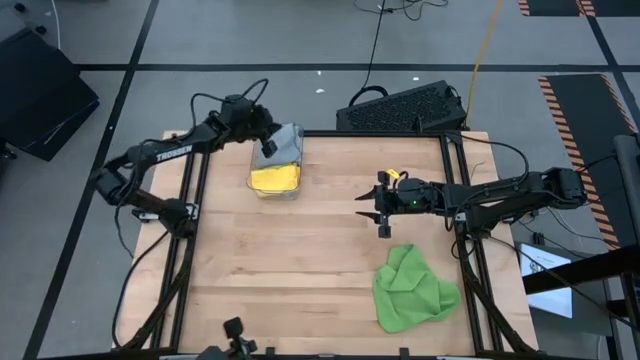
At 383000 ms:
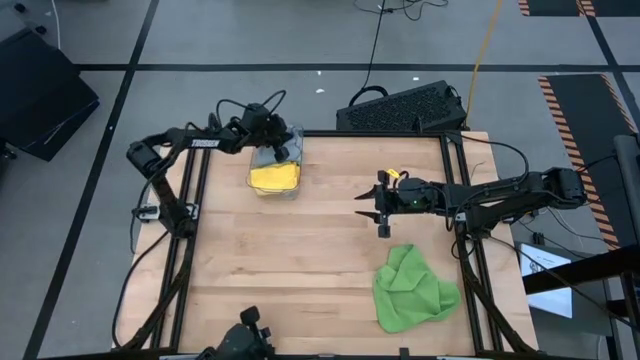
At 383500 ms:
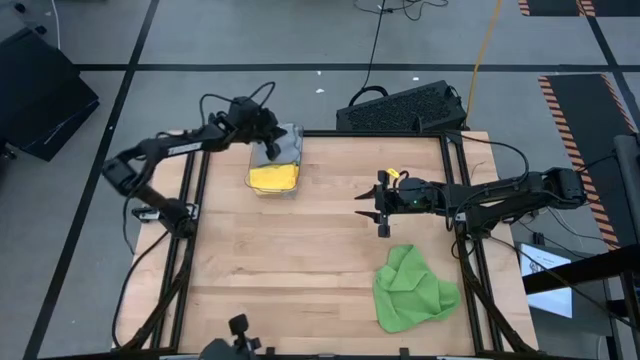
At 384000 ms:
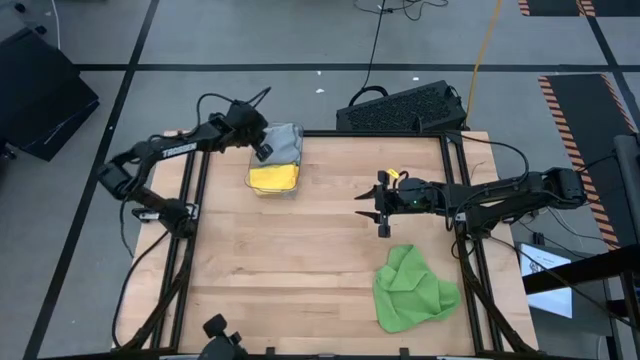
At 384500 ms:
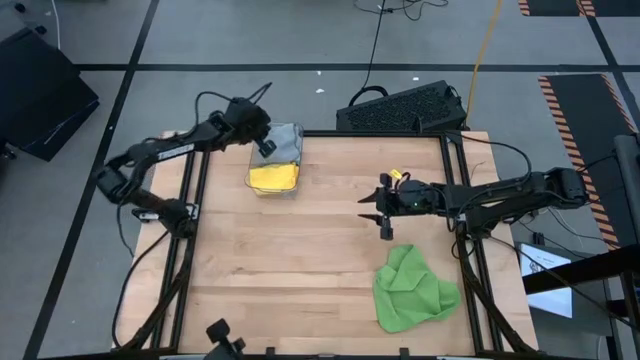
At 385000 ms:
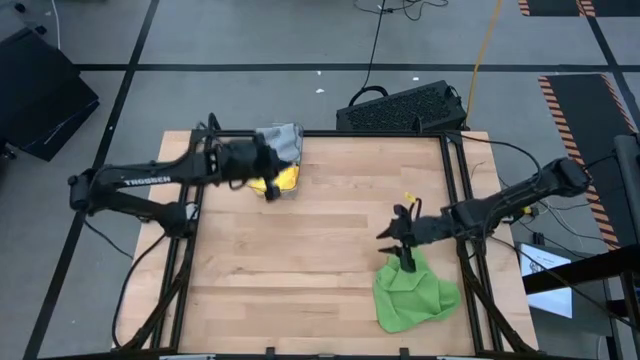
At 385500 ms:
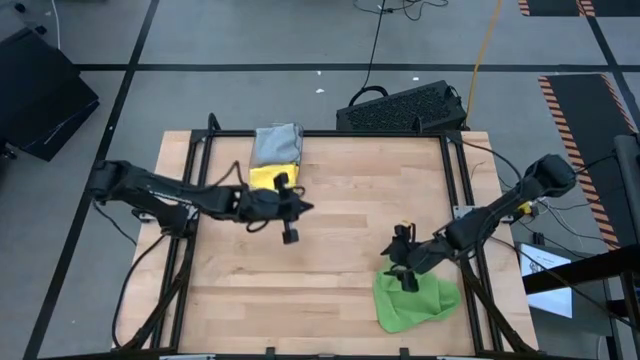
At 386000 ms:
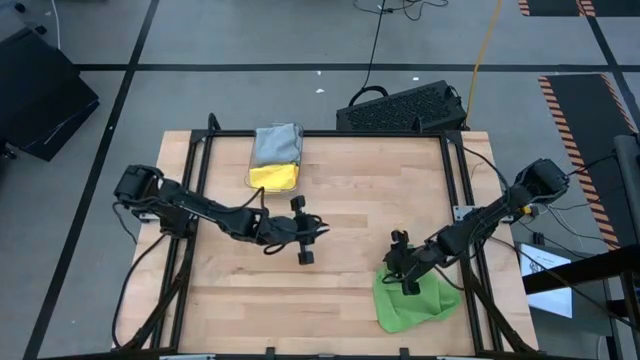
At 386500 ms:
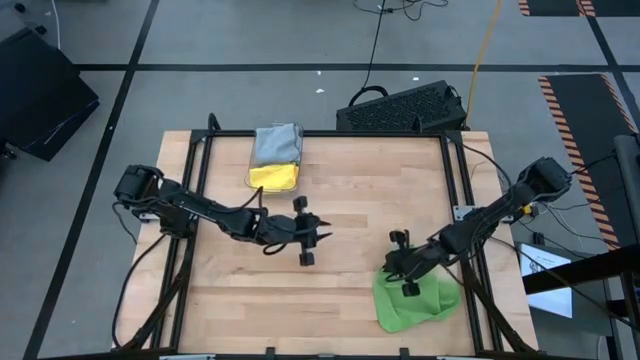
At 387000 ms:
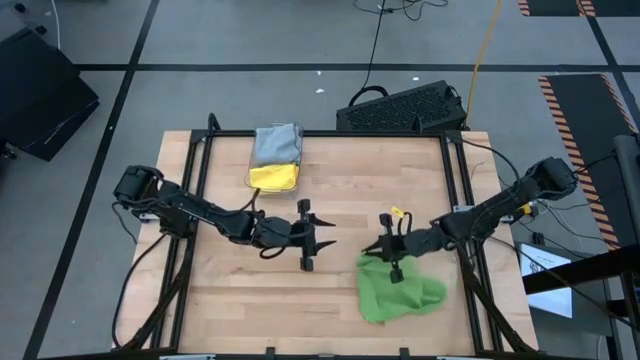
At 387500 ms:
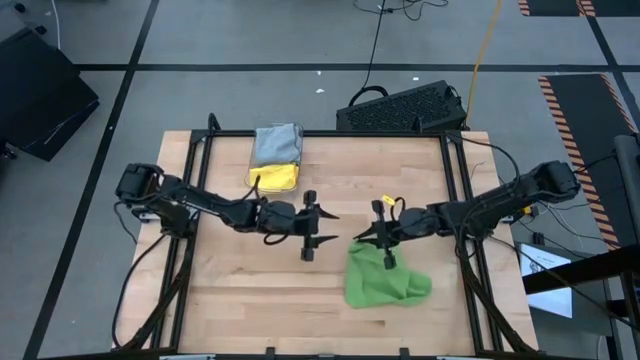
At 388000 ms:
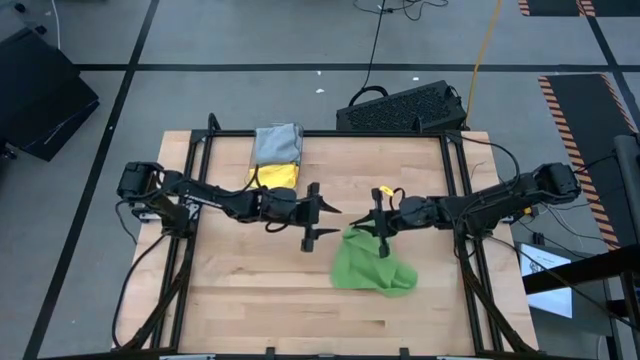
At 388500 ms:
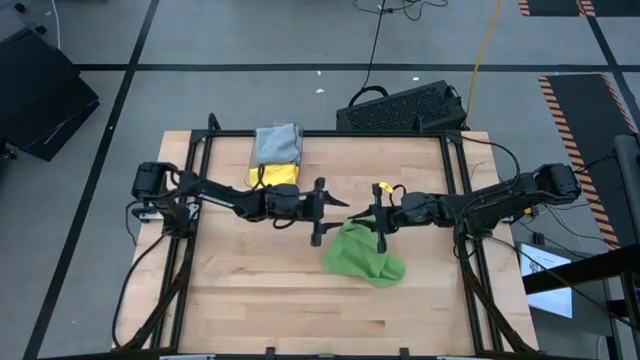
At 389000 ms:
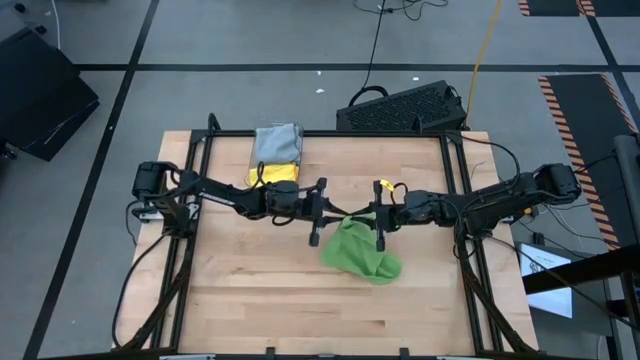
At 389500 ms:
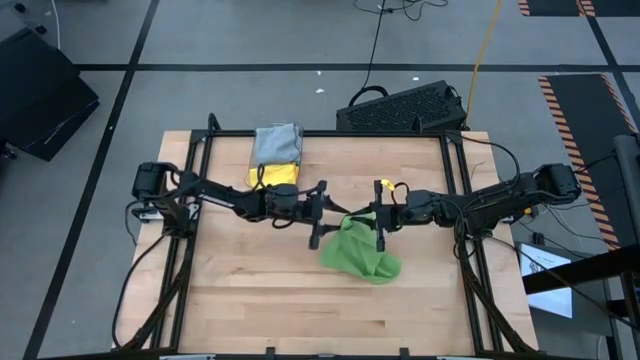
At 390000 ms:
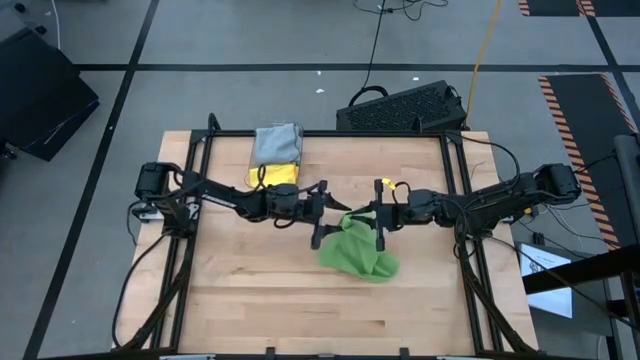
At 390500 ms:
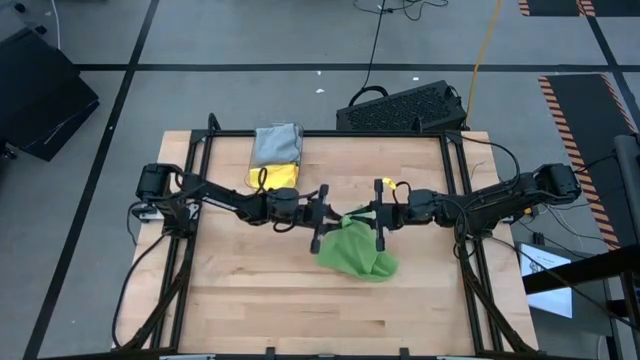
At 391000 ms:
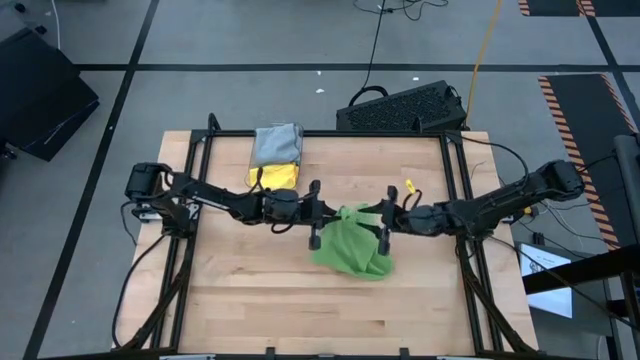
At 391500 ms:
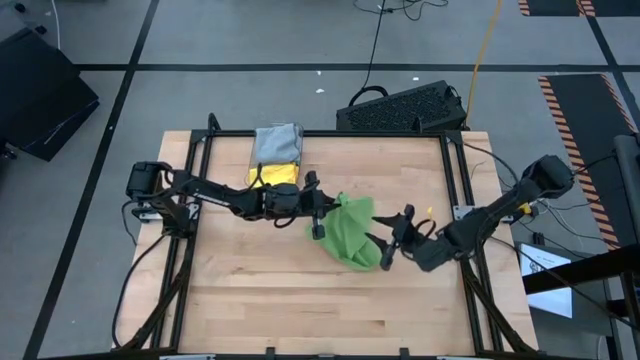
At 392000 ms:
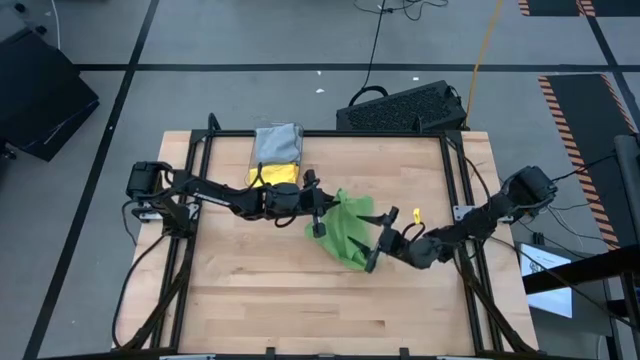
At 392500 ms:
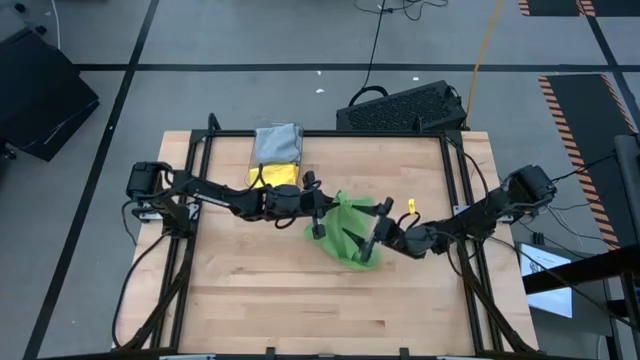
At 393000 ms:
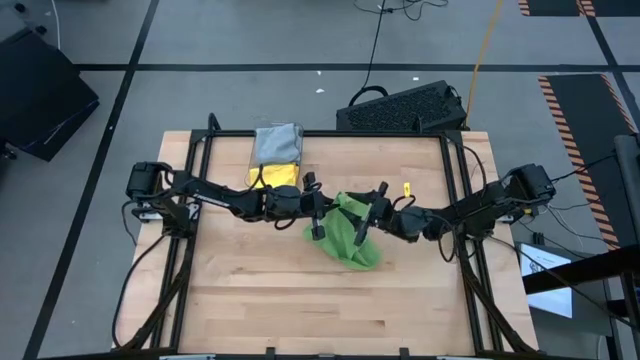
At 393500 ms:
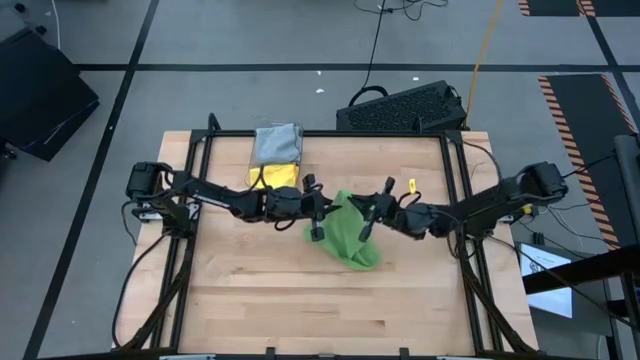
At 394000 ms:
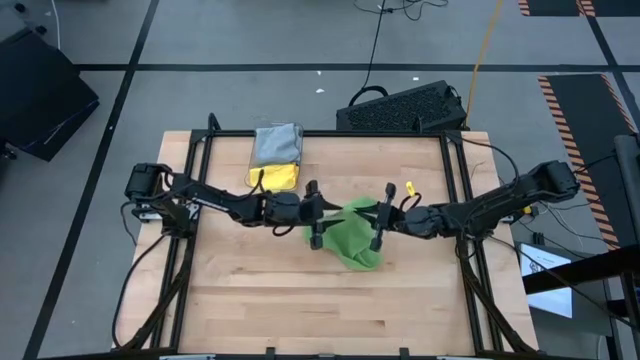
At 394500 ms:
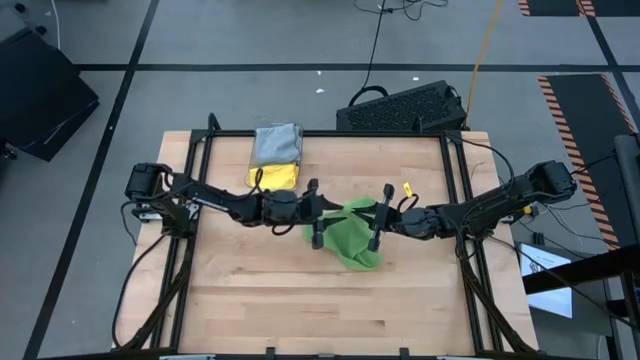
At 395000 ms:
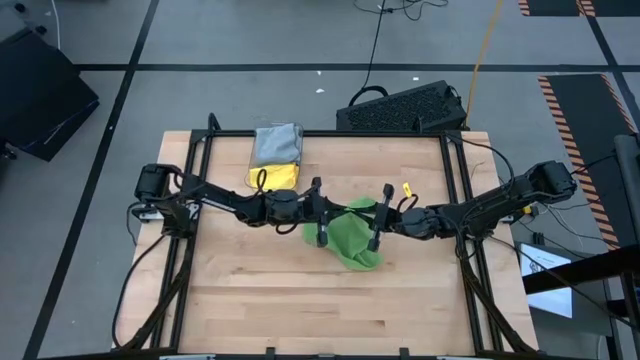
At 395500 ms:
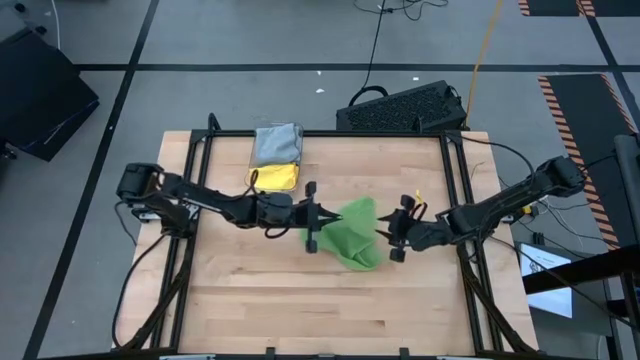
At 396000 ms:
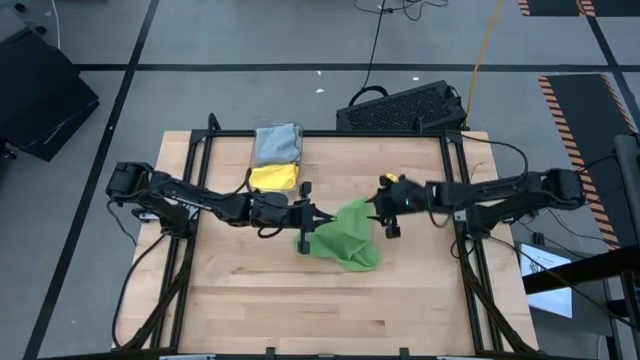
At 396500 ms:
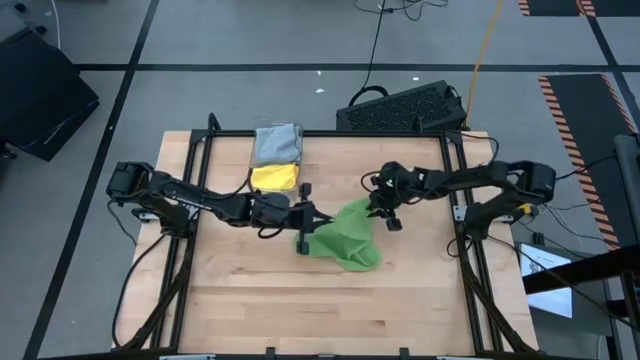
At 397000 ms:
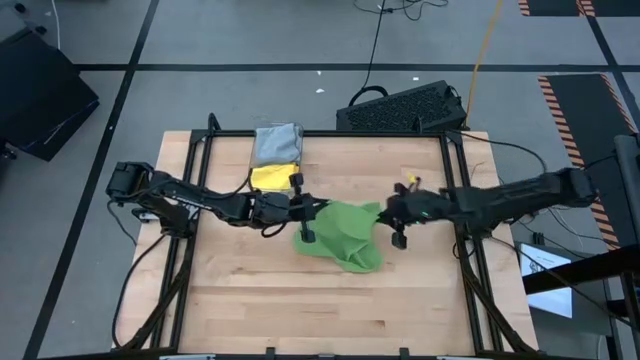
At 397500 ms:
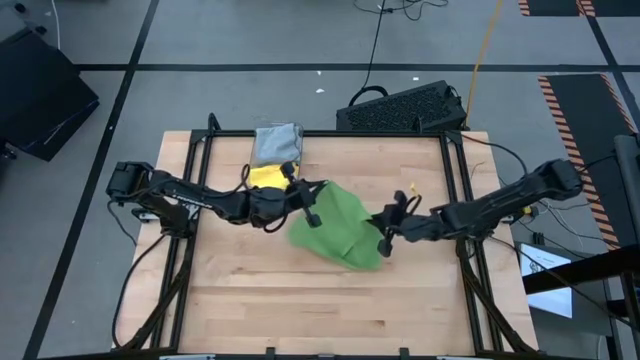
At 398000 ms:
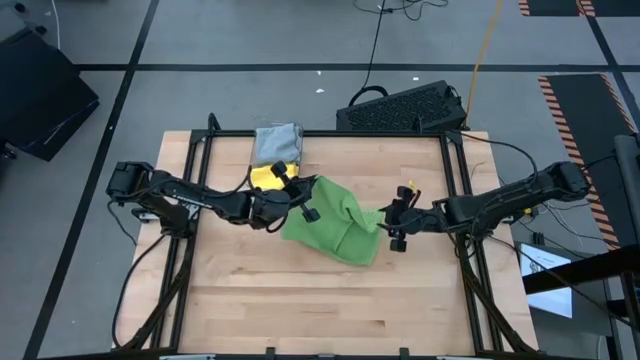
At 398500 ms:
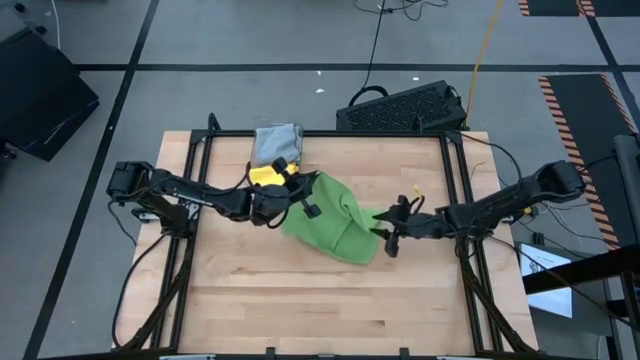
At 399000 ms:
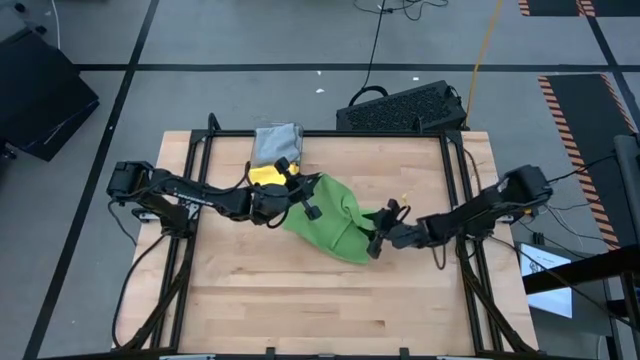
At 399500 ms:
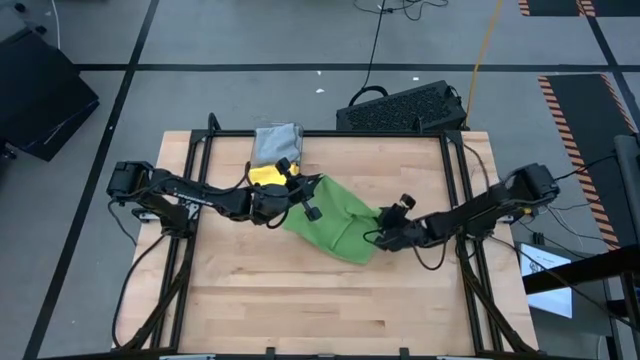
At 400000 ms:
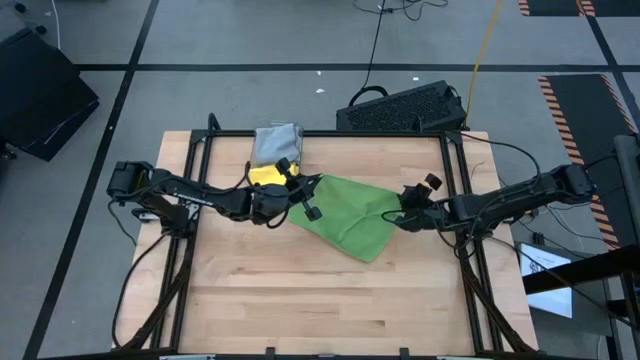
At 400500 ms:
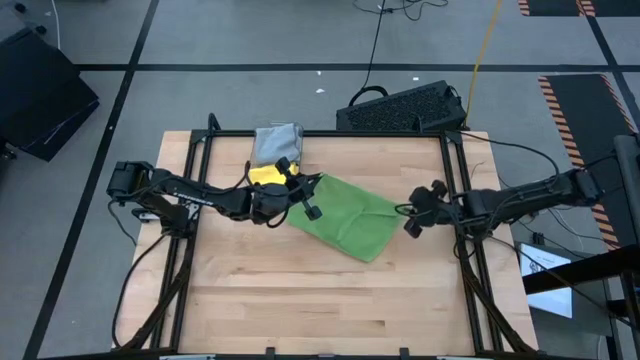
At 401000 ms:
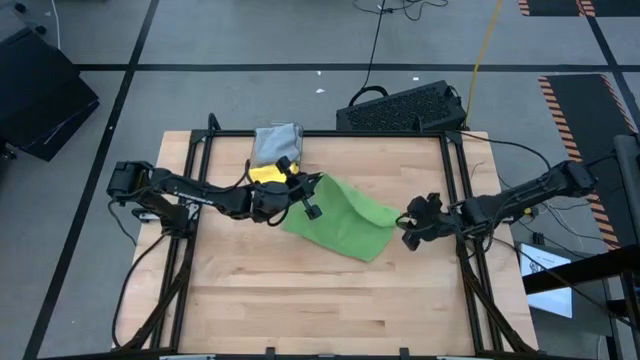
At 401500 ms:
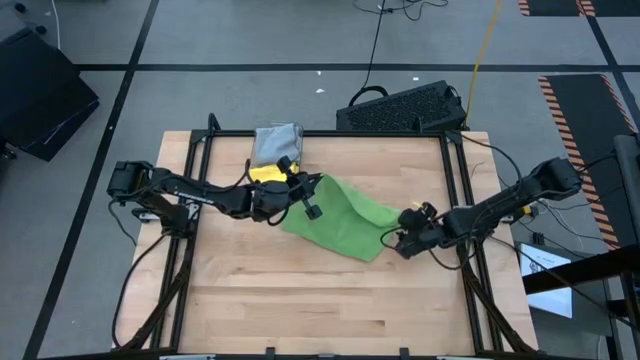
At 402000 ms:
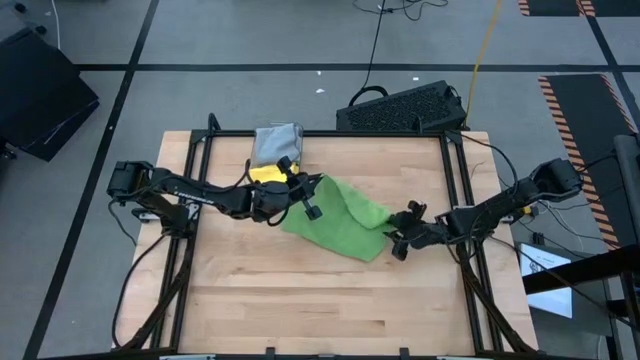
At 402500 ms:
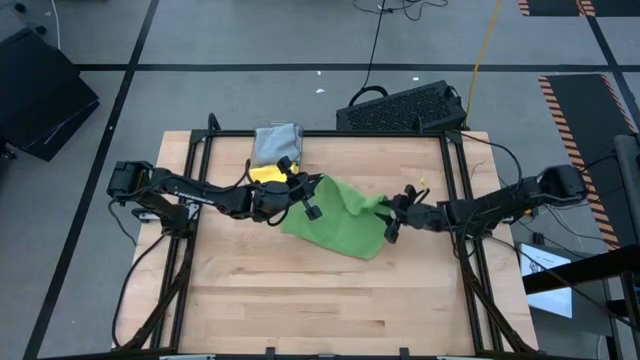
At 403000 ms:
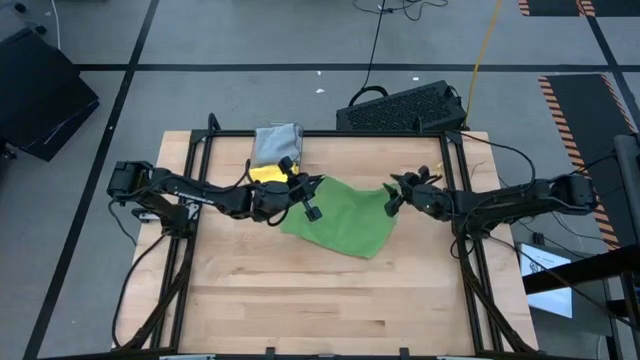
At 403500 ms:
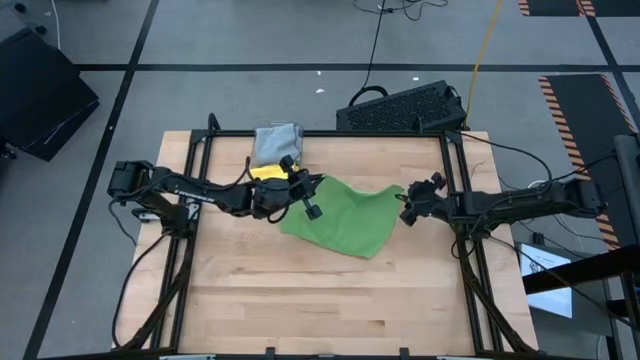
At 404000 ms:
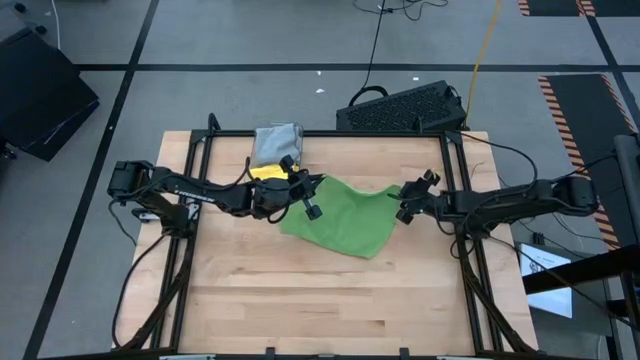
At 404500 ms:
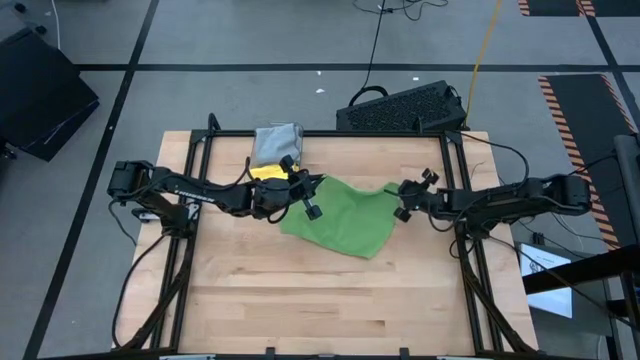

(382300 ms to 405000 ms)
Task: Fold microfiber towels
Fold the green towel on the table
